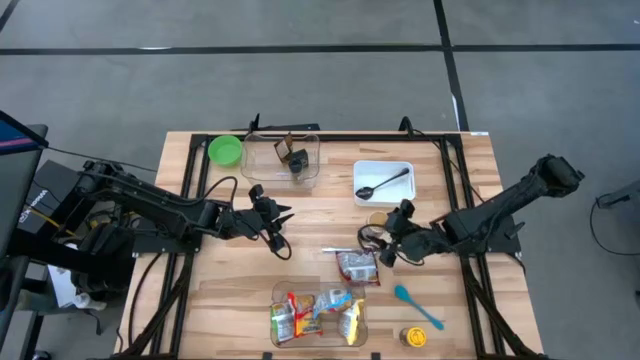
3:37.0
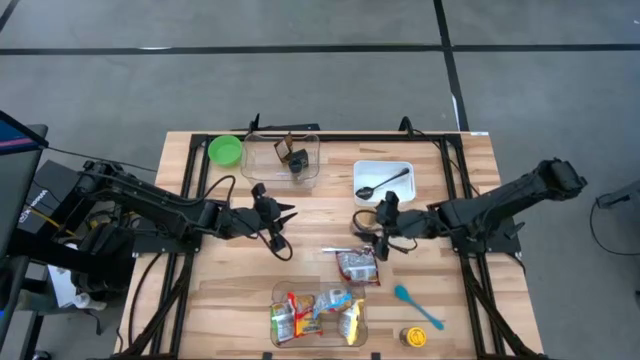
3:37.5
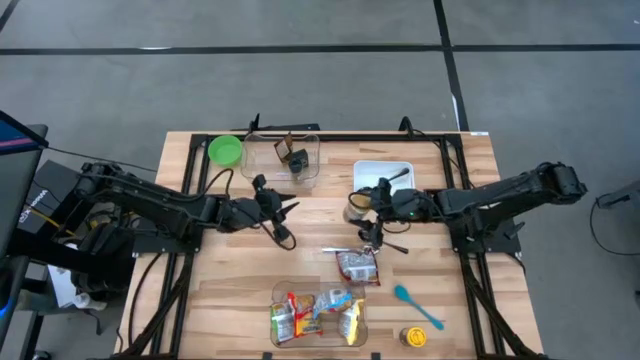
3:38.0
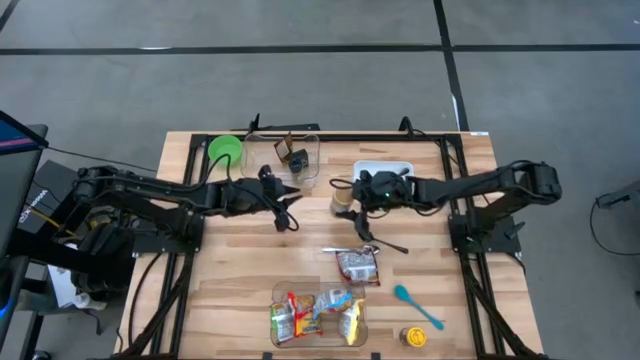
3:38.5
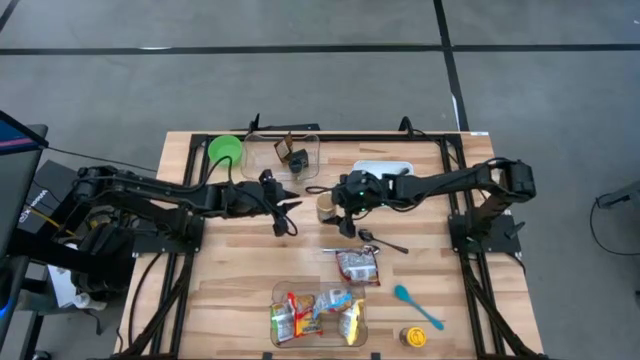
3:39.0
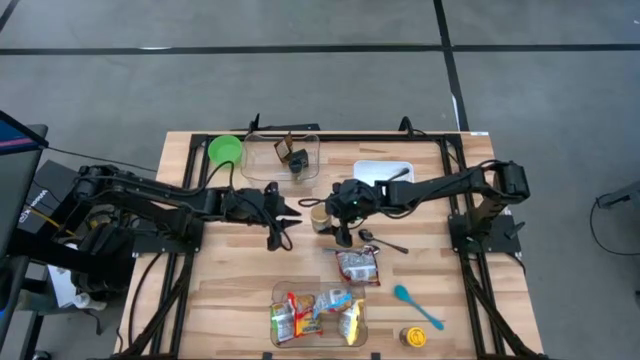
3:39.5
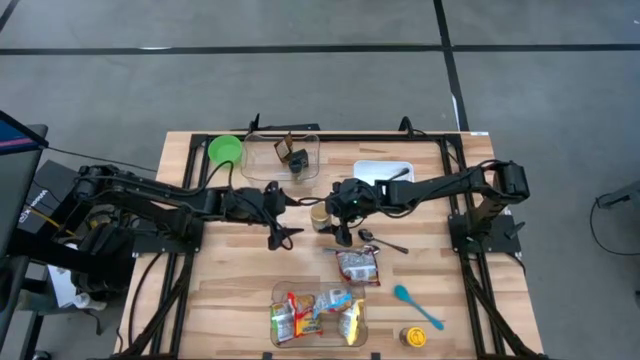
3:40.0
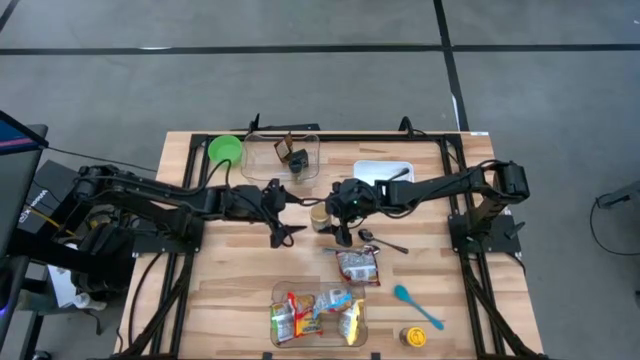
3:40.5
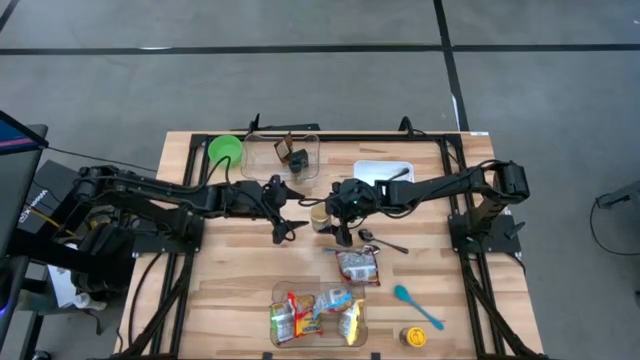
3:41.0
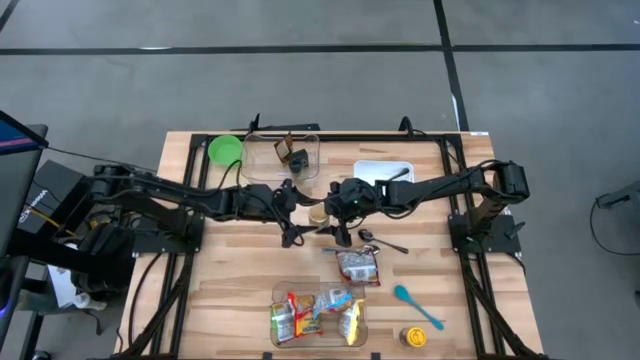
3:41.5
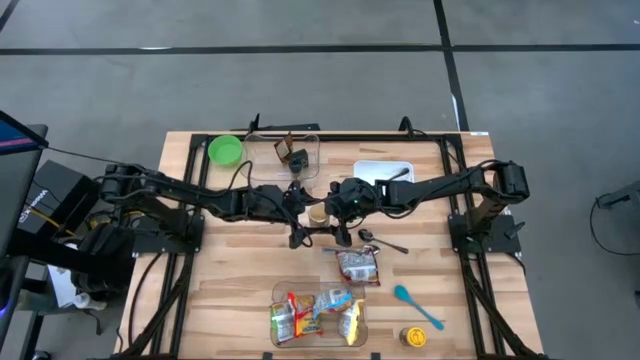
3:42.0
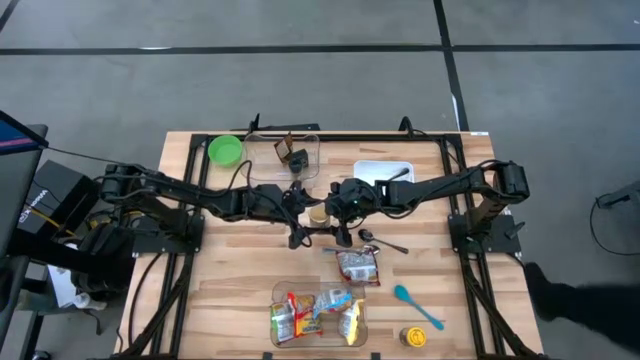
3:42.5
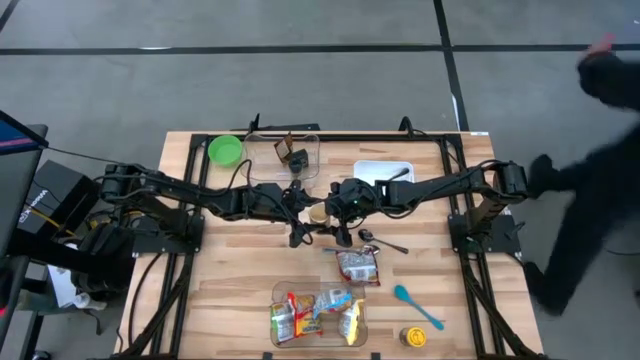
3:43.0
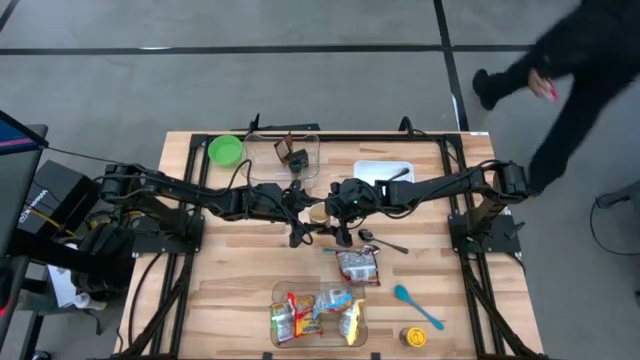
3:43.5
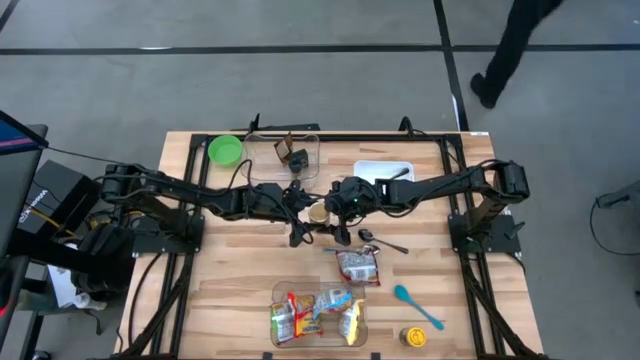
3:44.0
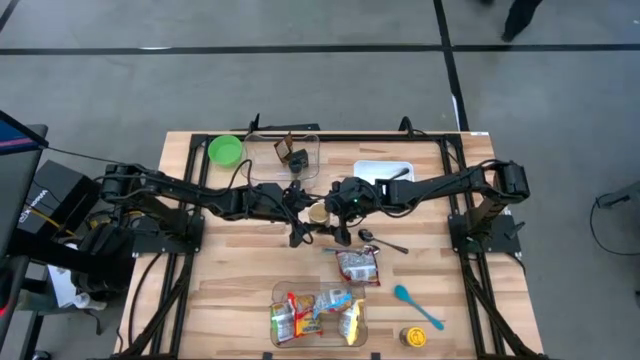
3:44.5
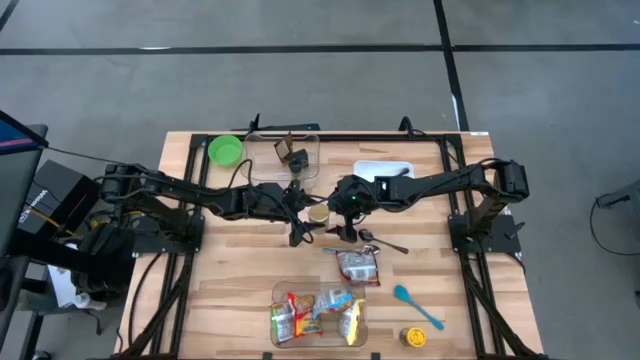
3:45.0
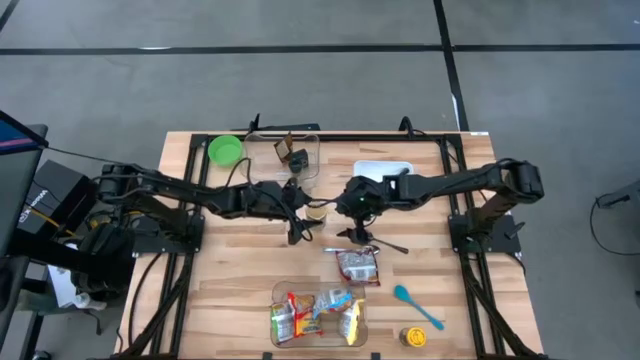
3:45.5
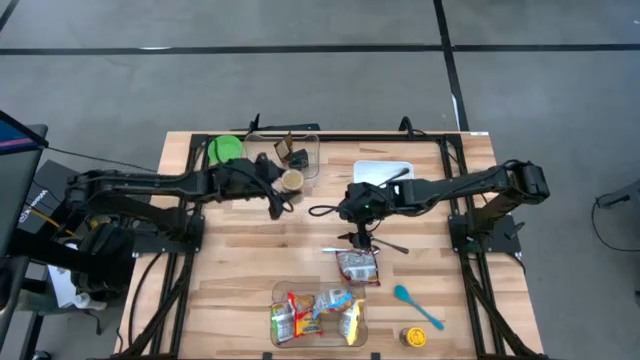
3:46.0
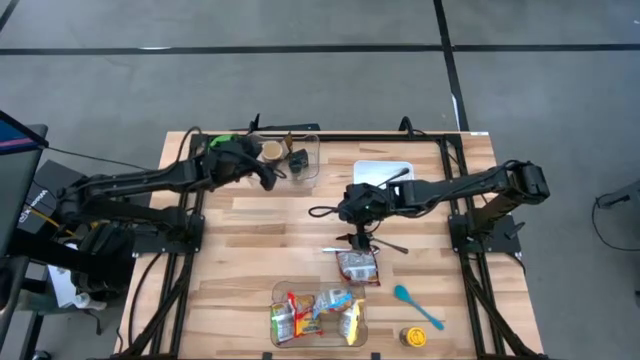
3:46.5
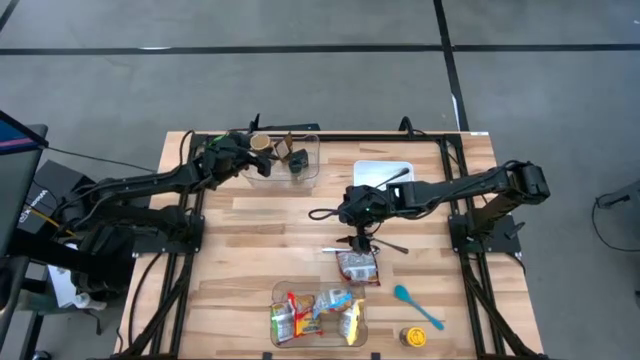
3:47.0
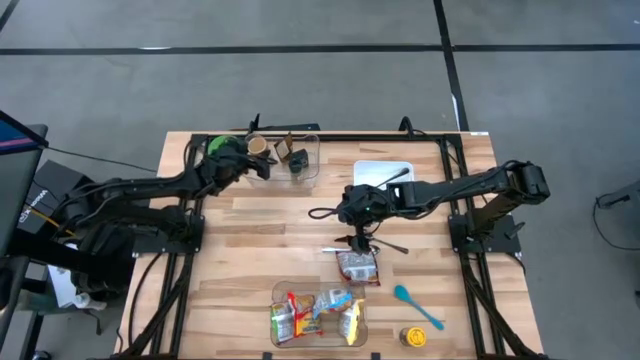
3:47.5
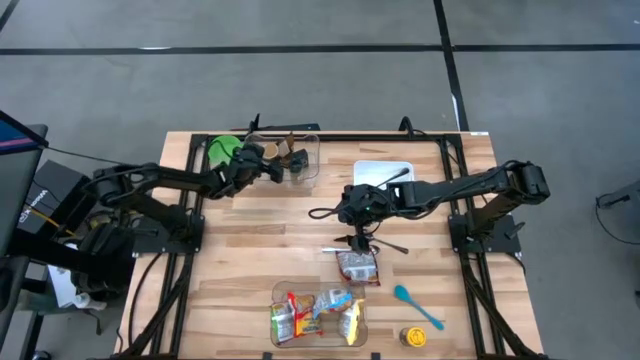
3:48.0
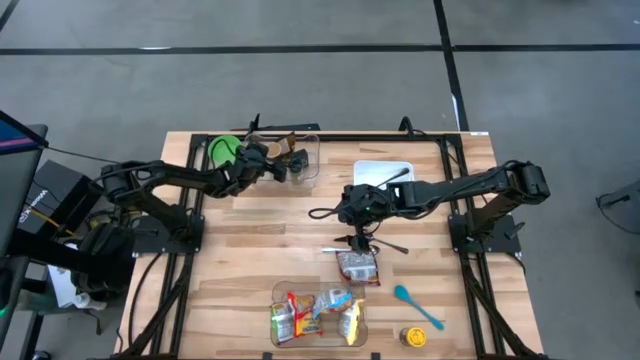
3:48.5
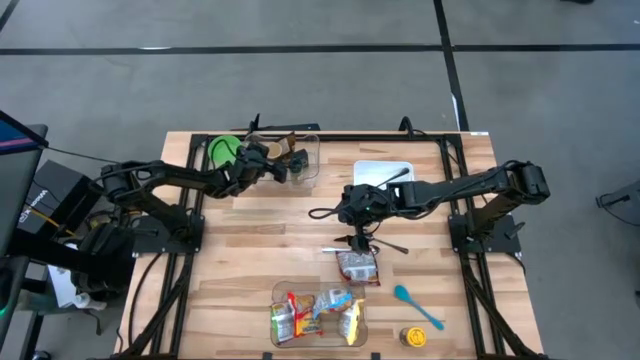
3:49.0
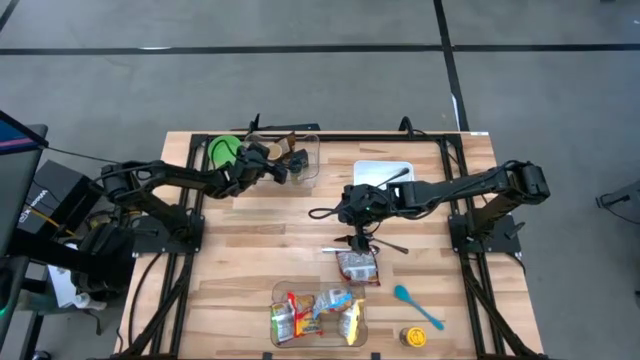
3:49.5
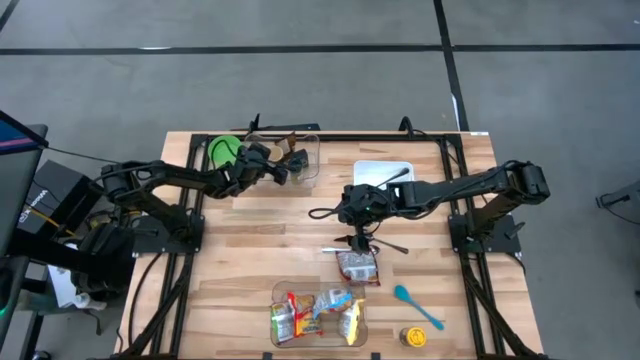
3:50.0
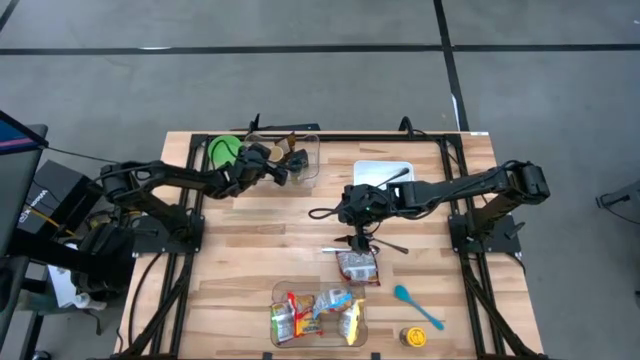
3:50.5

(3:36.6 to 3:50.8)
Task: Pick & Place Food Item
Put the gold seasoning bottle into the top transparent bin

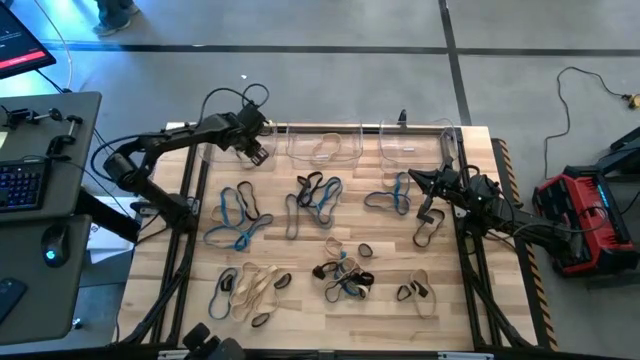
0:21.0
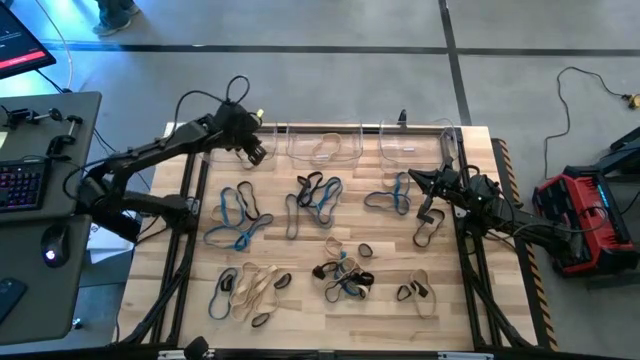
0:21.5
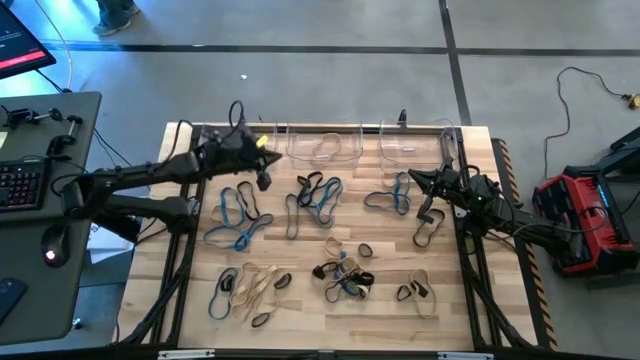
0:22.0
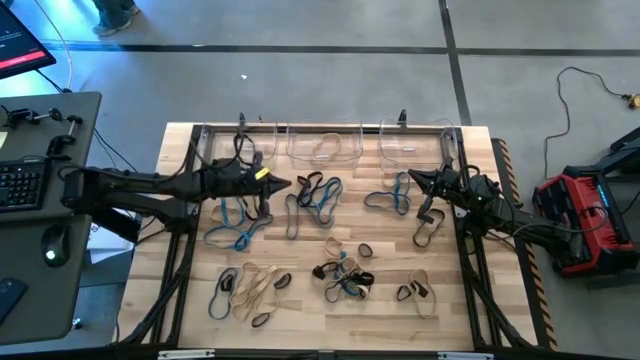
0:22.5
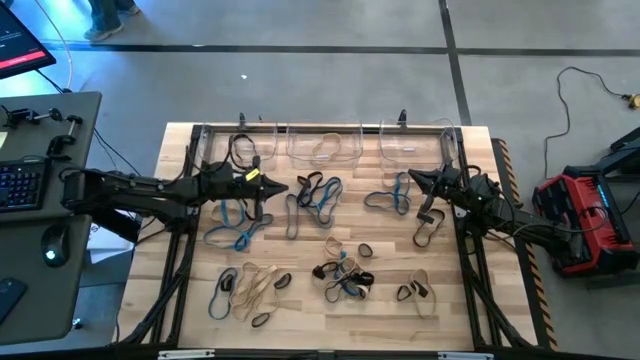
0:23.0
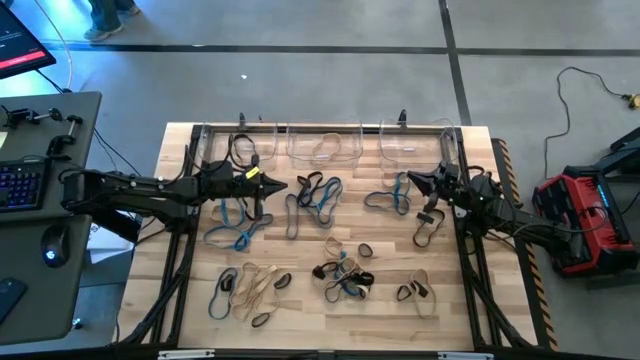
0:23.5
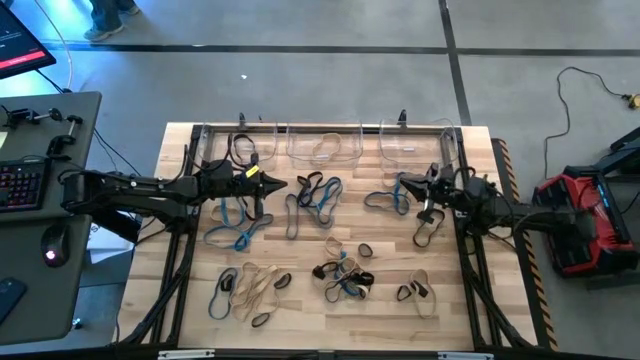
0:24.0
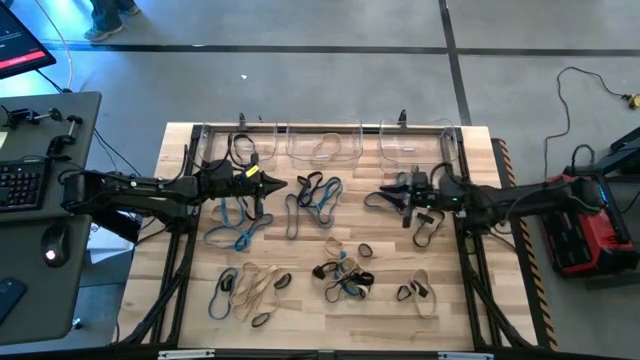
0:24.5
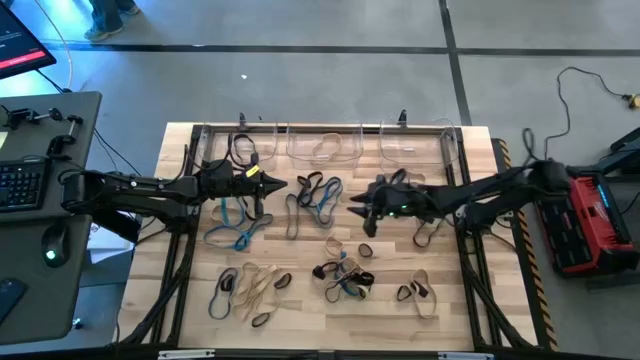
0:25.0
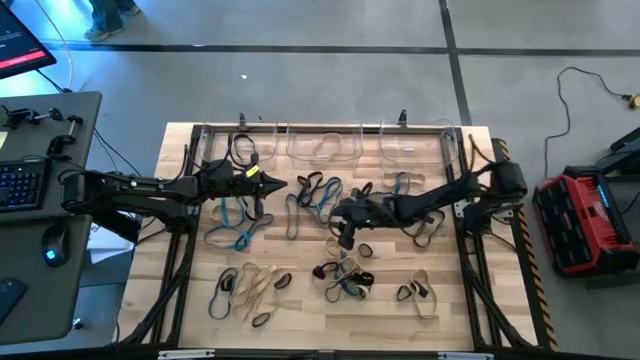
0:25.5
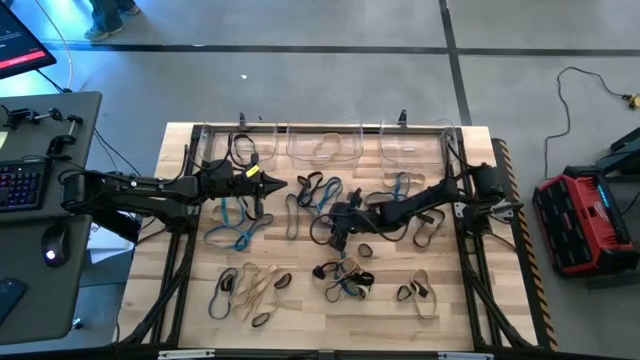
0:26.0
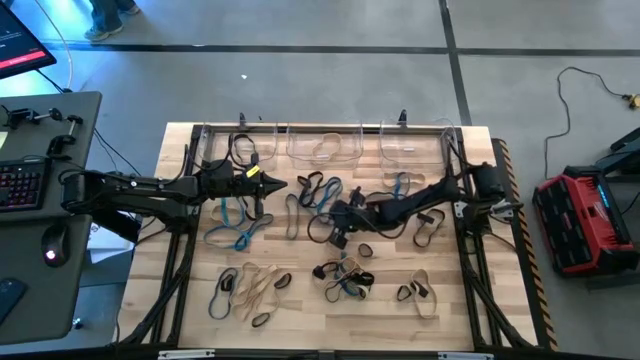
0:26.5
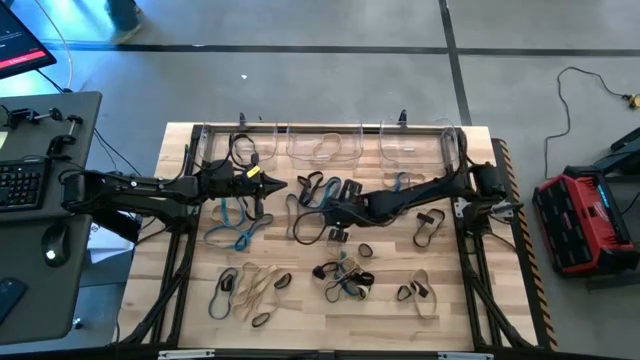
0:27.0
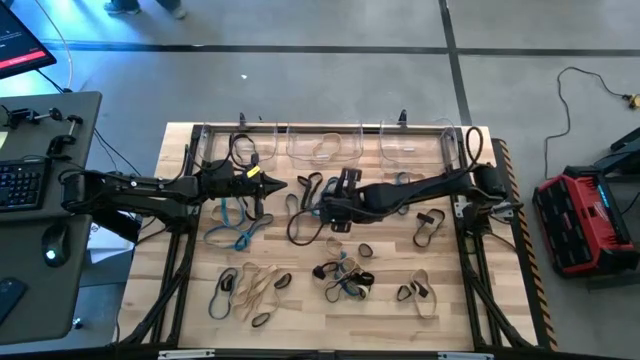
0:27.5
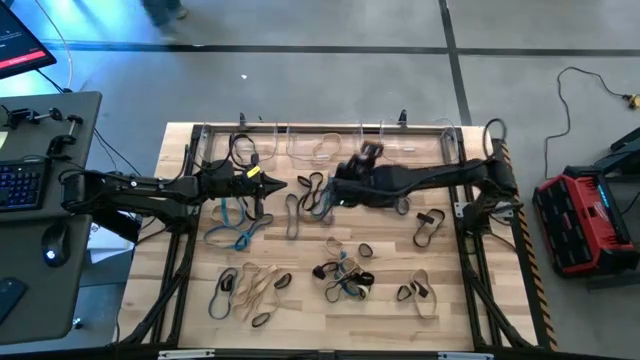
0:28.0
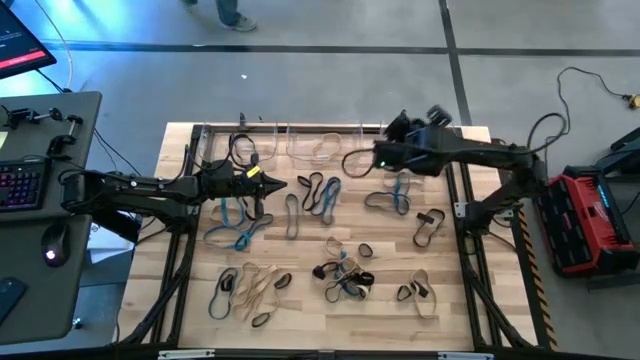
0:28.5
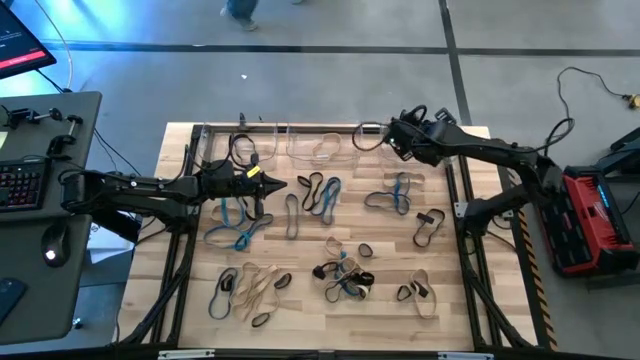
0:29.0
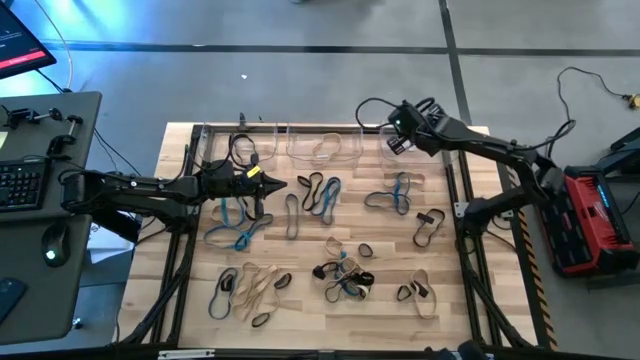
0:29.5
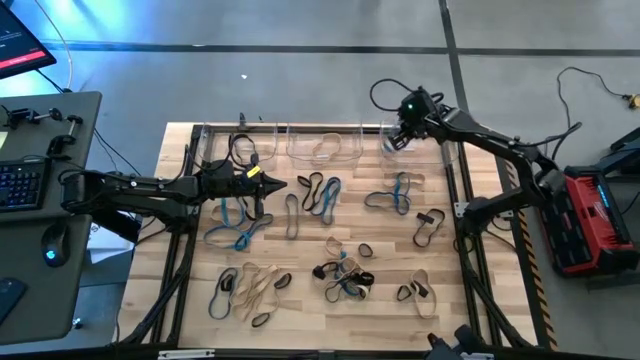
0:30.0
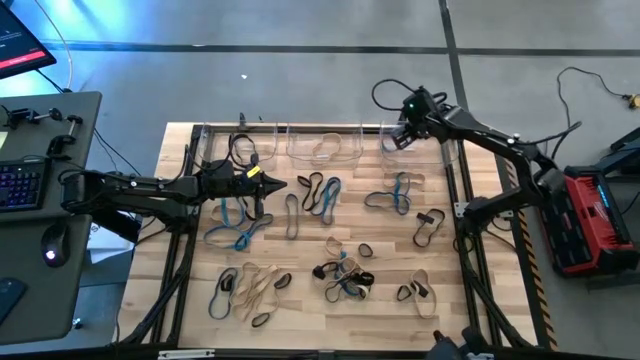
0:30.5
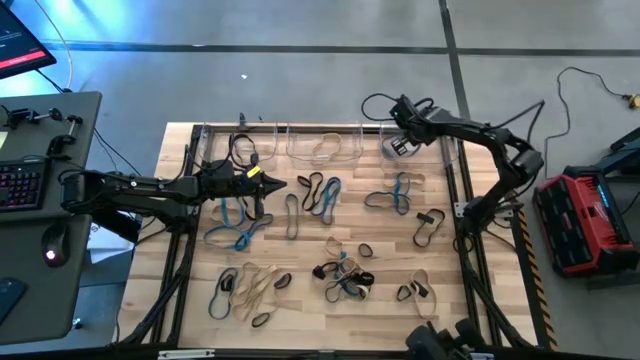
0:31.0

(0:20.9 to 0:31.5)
Task: Sort rubber bands into baskets
Put the blue rubber band into the right transparent bin
